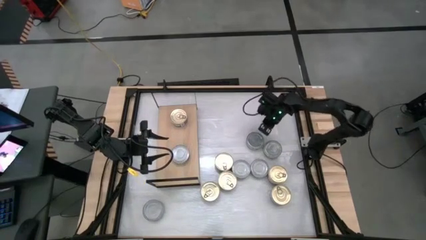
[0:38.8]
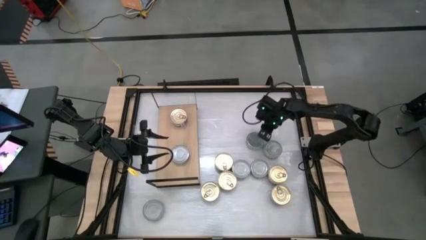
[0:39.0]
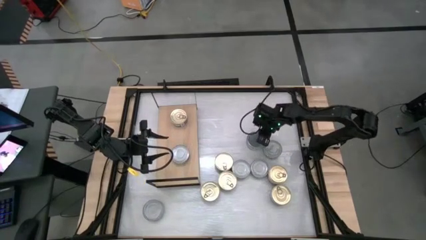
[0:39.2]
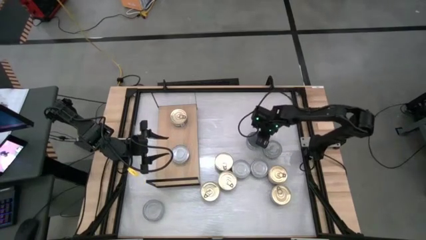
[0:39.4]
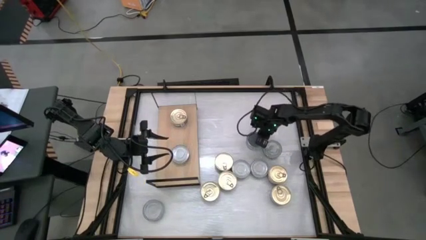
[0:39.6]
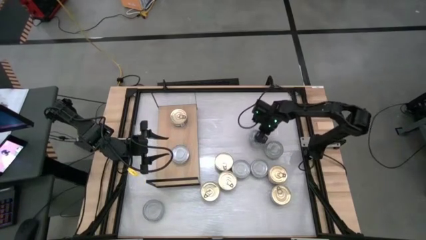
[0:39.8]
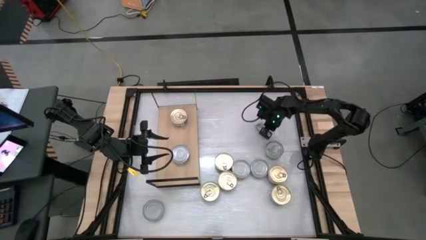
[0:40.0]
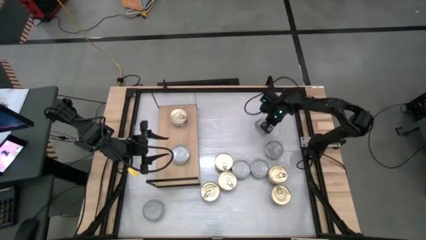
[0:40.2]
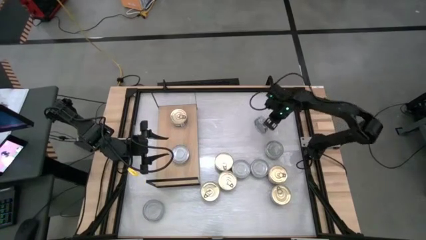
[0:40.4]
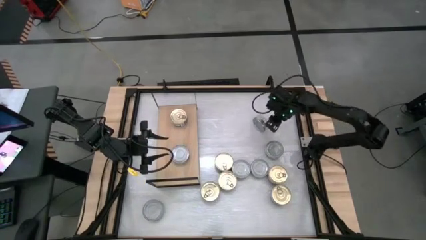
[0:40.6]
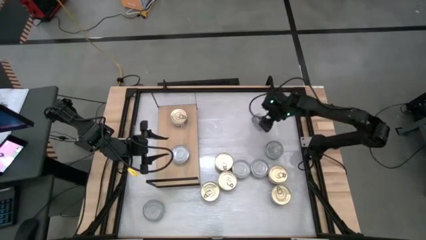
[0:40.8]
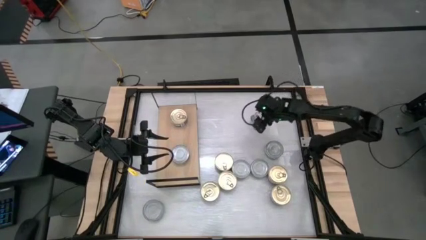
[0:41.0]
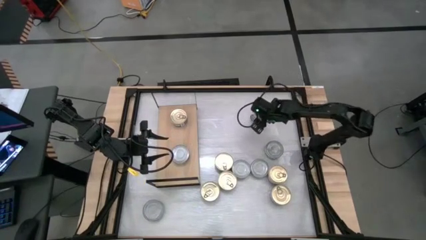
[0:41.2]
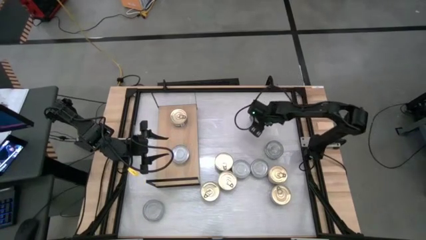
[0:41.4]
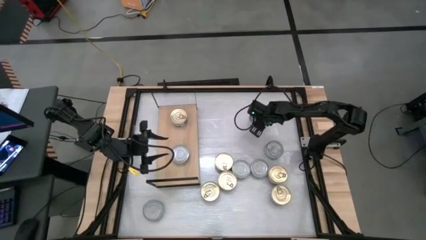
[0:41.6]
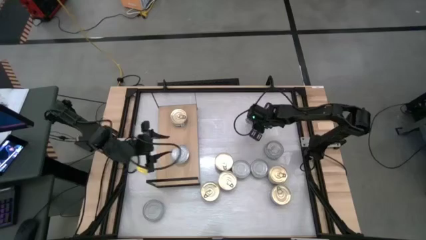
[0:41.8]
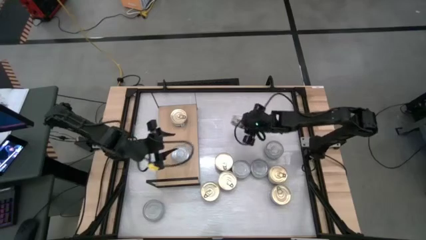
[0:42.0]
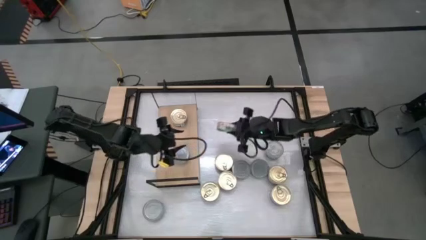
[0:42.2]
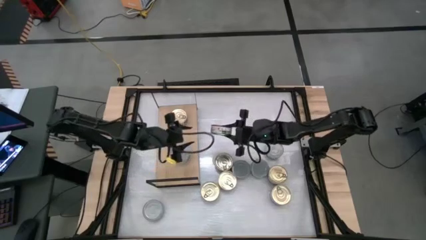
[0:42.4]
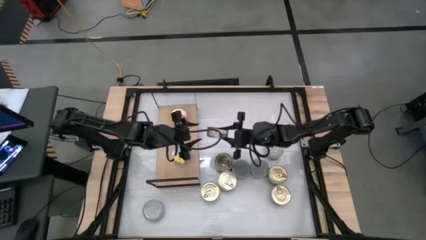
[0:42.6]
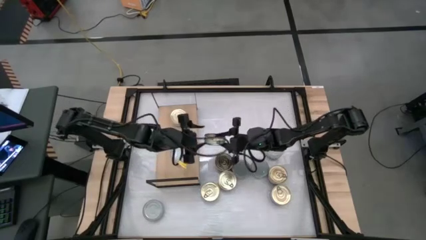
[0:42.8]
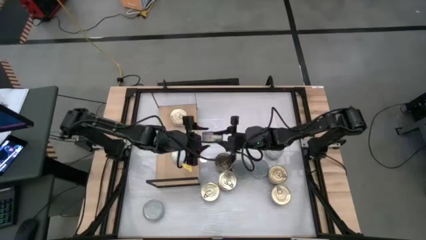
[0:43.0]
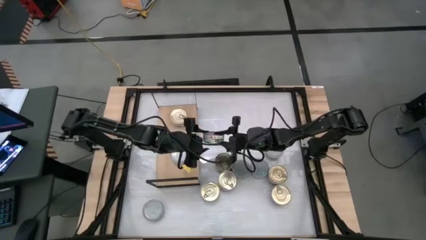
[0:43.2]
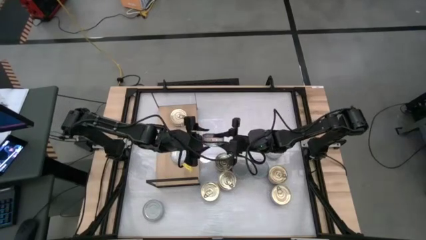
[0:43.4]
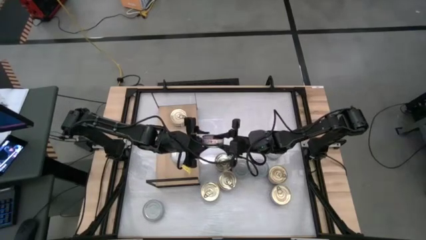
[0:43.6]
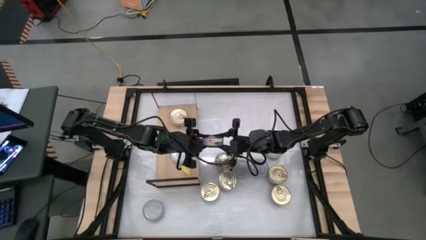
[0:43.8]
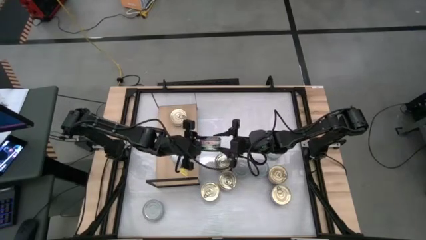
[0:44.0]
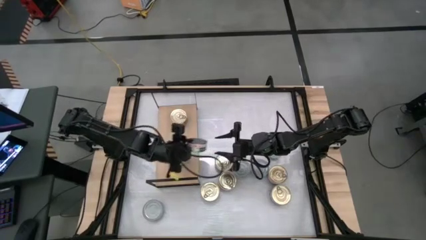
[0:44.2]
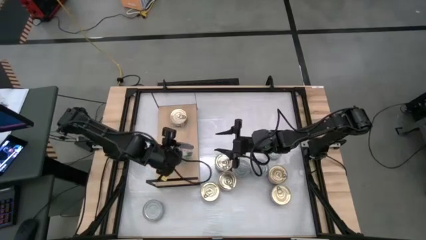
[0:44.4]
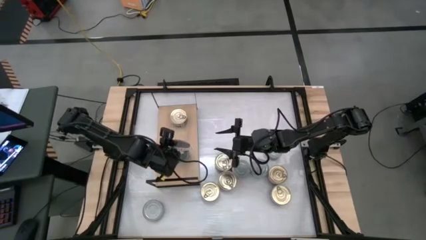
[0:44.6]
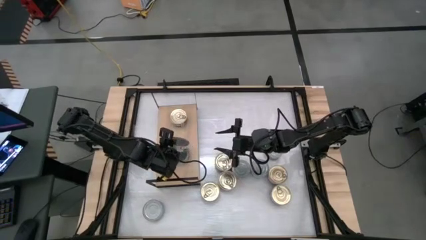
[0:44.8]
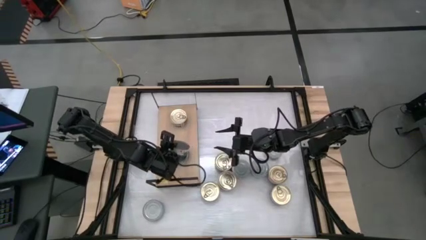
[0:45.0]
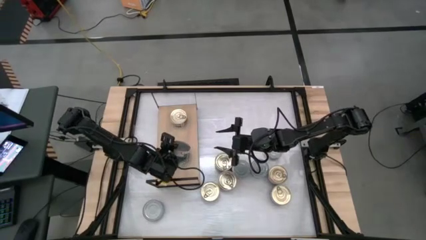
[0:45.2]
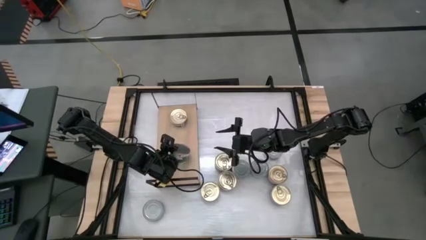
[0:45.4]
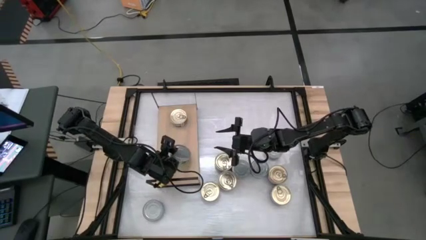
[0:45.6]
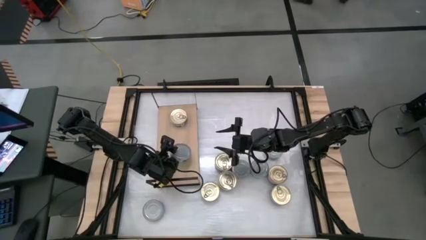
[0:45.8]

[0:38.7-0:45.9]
Task: Stack canned seafood by type on shelf
Stack the green tuna can on top of the other green tuna can on the shelf

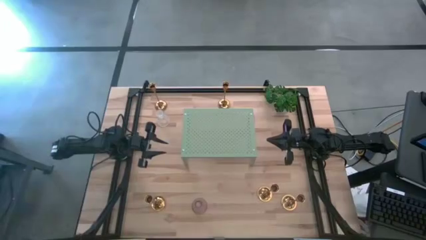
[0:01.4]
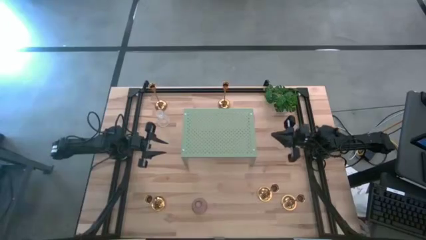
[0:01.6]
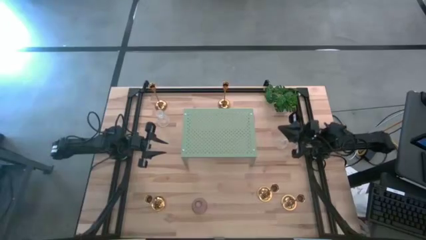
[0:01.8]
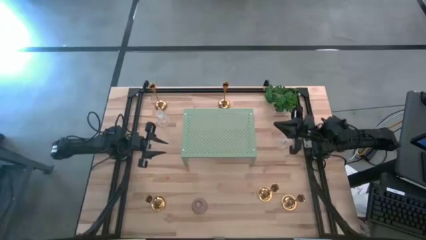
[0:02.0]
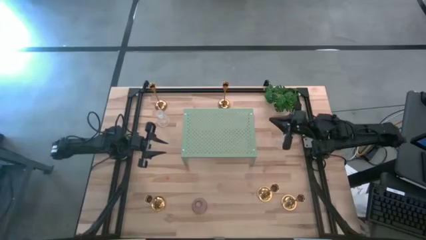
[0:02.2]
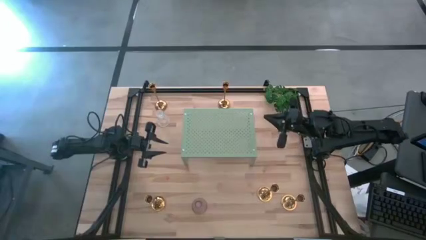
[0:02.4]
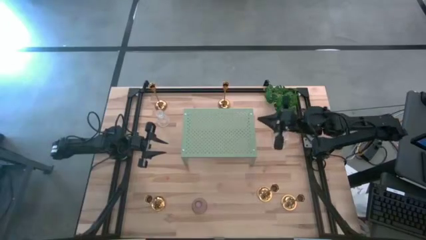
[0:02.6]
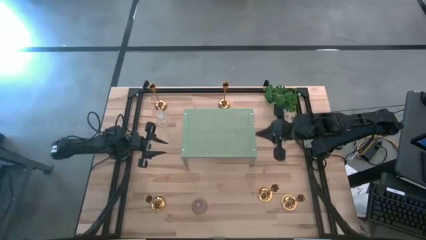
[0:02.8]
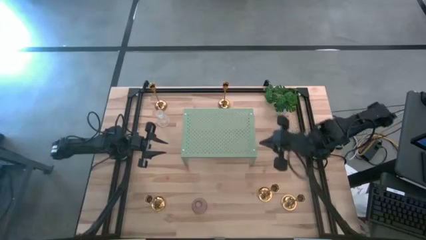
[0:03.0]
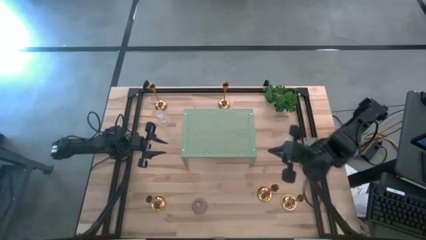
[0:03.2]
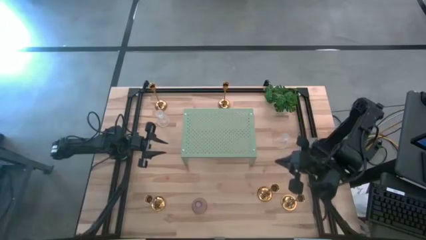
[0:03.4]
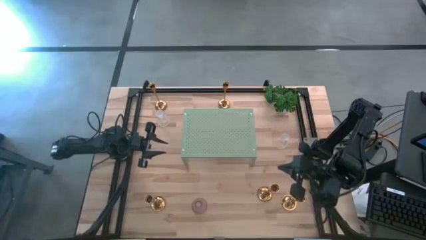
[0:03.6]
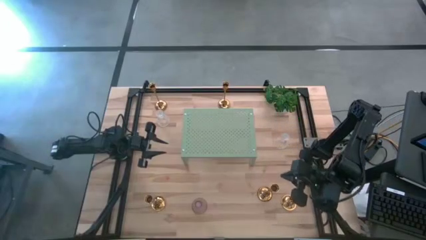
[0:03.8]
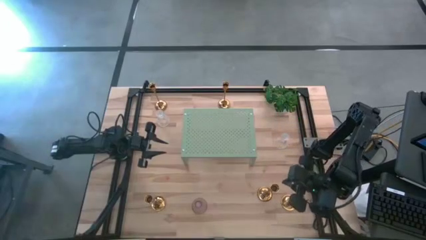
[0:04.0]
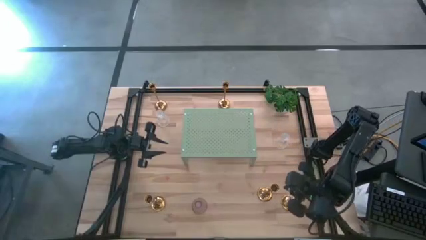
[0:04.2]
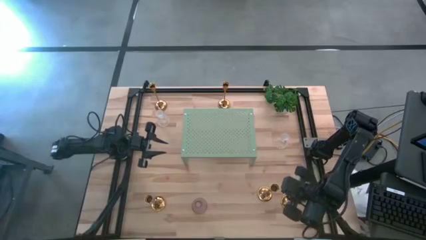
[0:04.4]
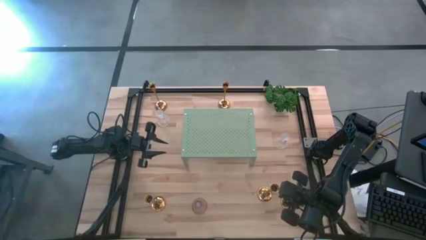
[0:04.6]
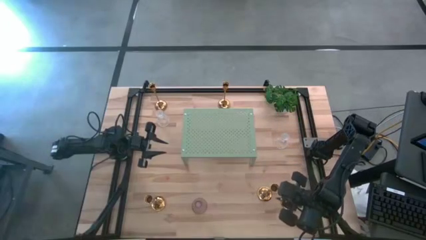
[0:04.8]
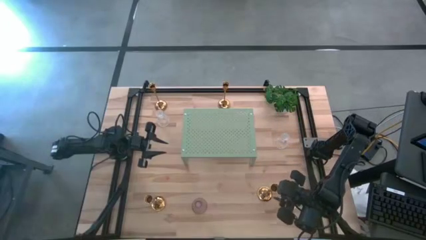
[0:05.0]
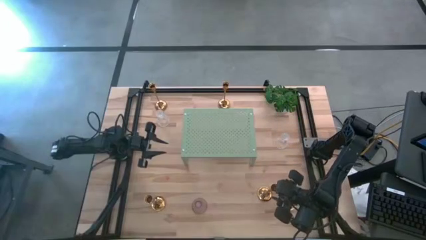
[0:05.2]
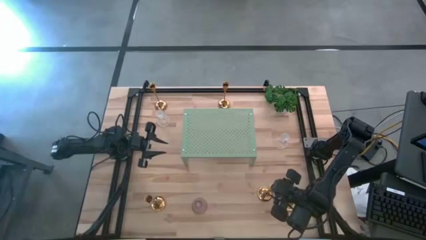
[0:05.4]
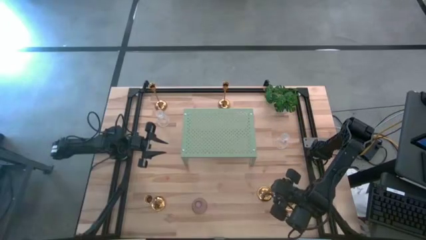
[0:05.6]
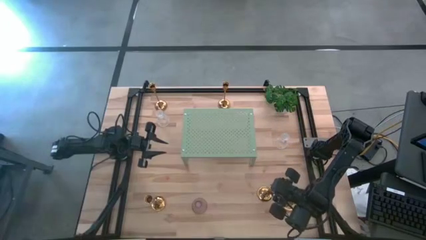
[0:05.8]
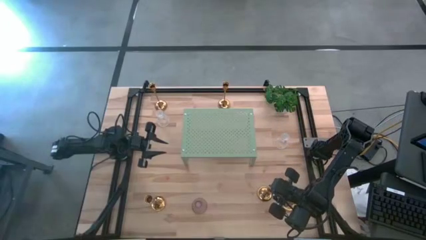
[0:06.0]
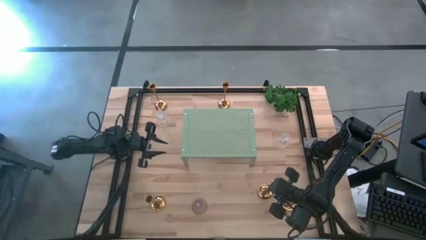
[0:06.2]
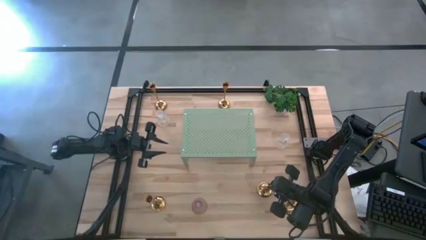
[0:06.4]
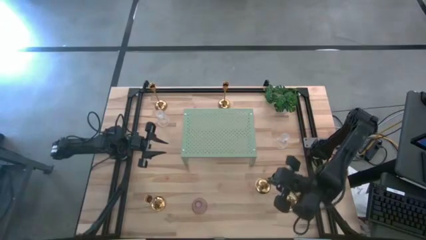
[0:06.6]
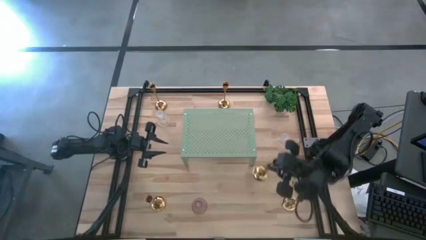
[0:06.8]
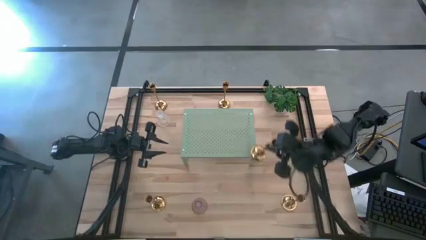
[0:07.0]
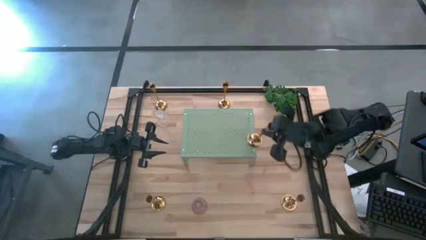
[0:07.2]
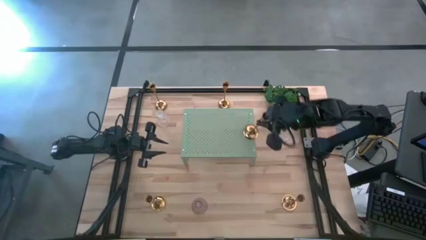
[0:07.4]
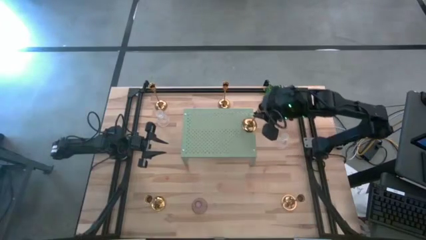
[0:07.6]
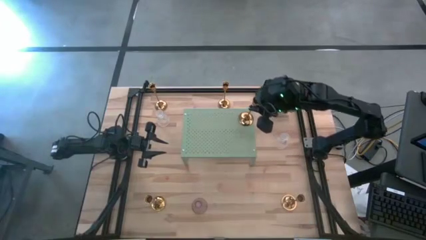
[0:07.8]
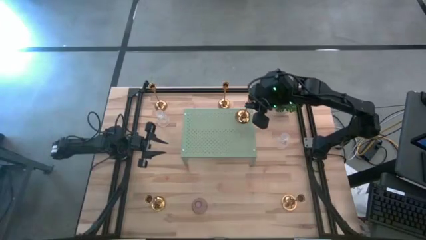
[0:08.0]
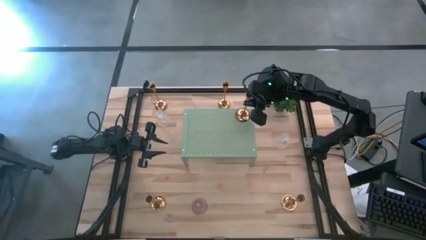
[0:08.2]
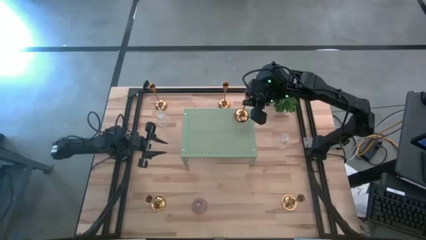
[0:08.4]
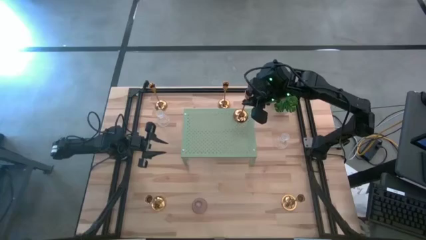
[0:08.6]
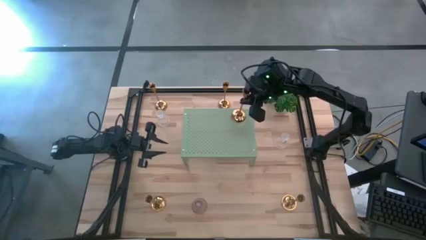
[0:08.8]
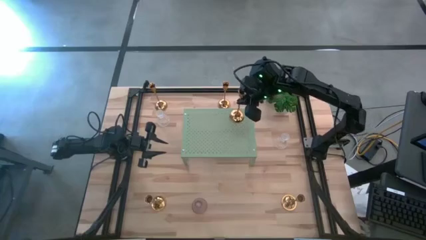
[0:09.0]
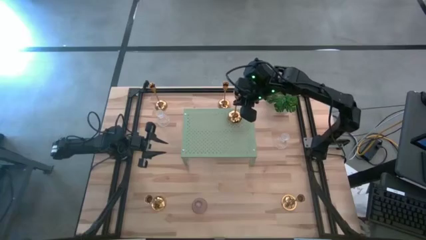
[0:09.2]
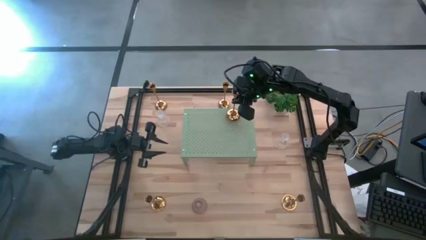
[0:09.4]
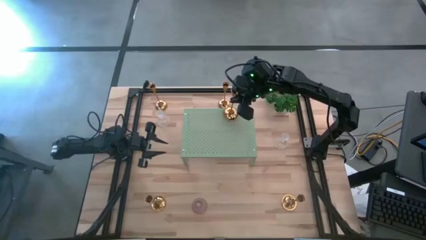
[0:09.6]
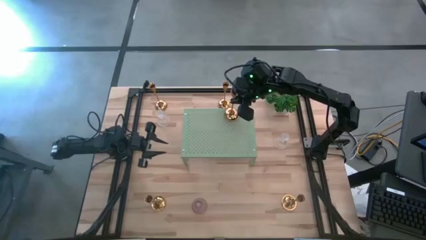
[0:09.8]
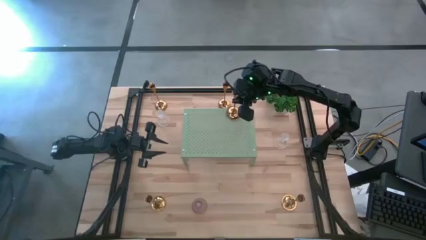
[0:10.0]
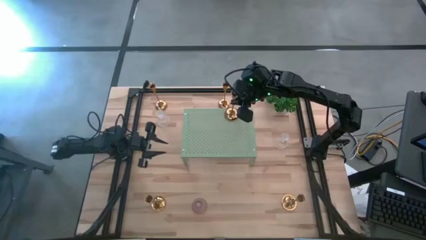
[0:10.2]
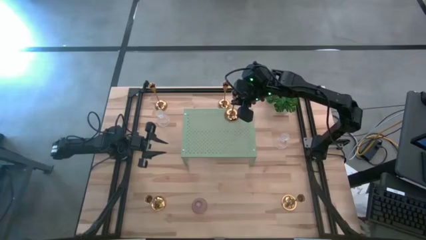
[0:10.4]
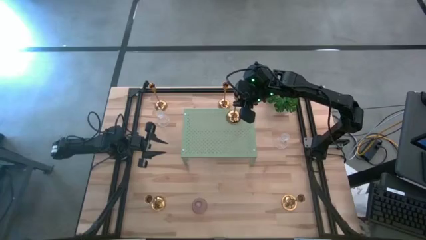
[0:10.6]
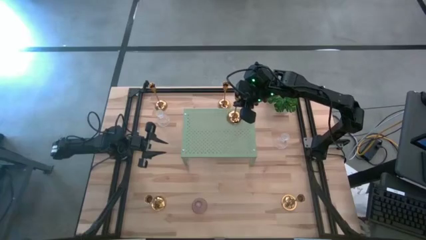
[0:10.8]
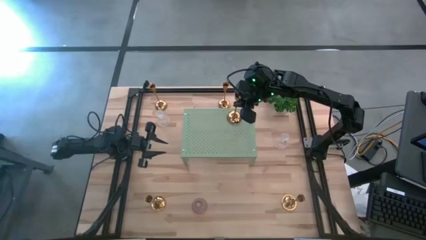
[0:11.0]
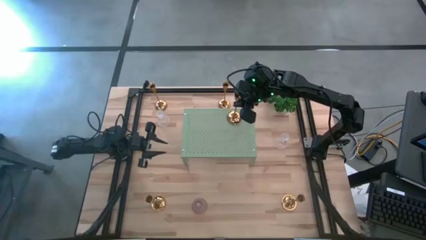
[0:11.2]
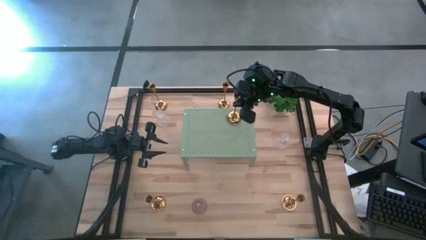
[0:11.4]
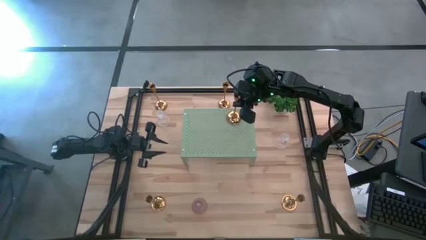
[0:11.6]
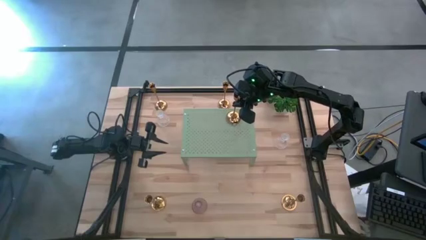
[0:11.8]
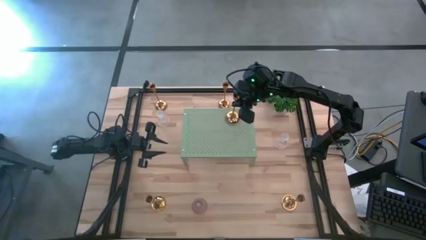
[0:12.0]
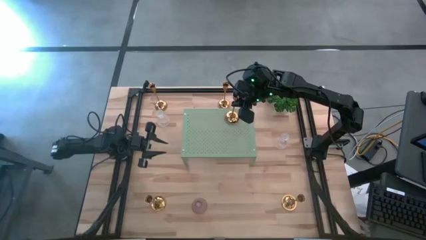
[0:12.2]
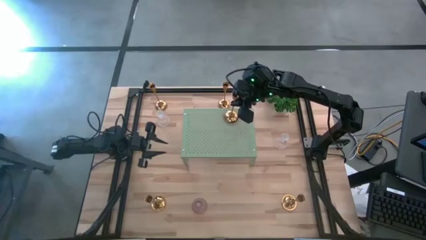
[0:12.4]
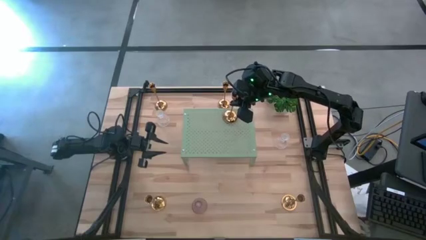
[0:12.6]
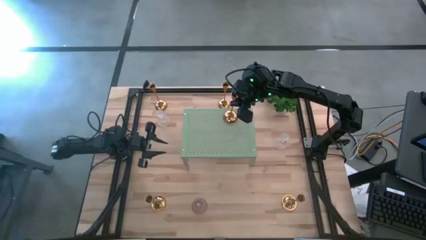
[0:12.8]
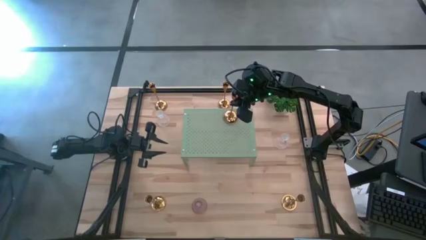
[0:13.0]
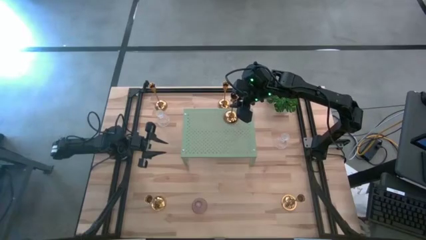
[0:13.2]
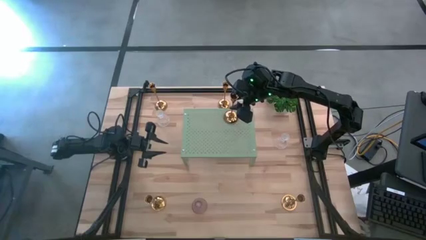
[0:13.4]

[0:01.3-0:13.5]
Task: Pick & Place candle stick holders
Put the gold candle stand on the shelf
